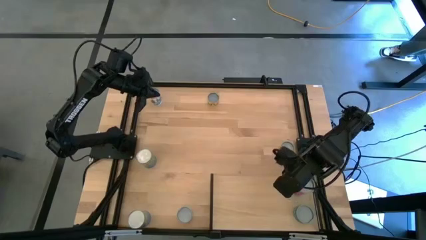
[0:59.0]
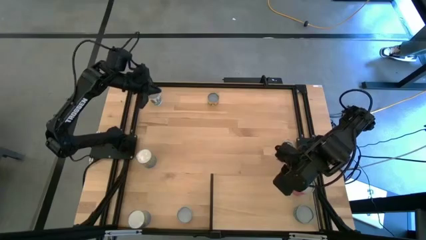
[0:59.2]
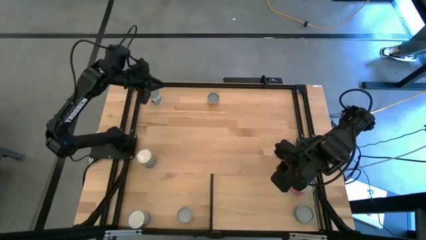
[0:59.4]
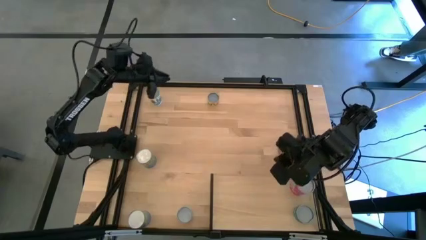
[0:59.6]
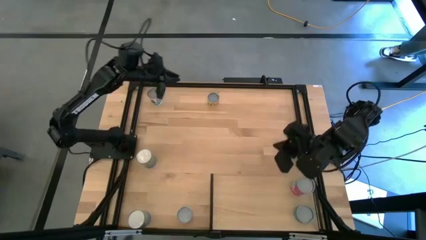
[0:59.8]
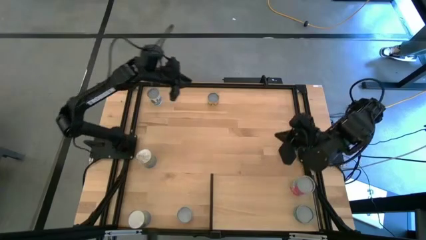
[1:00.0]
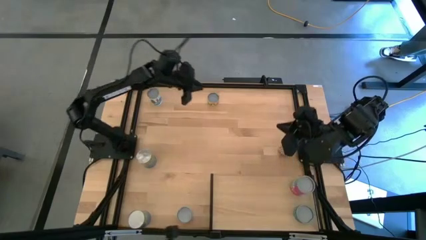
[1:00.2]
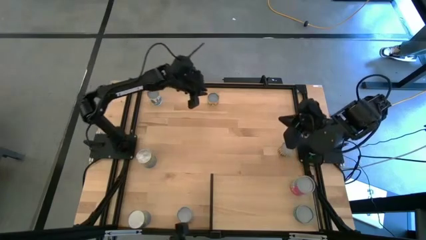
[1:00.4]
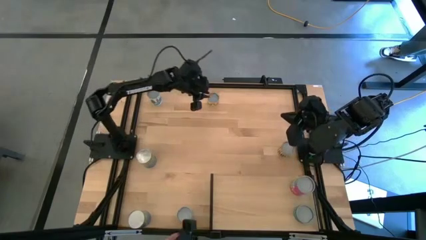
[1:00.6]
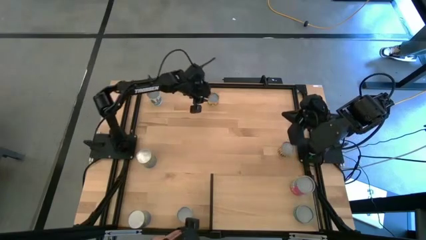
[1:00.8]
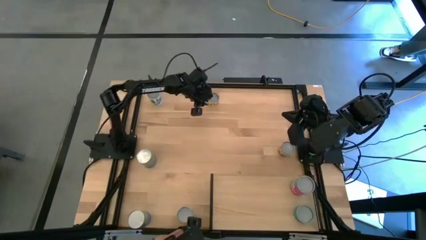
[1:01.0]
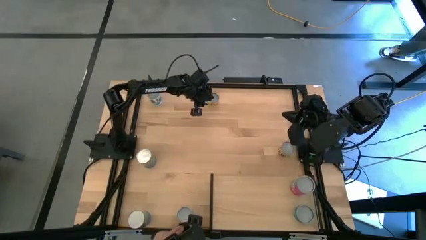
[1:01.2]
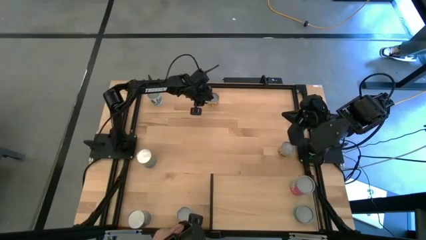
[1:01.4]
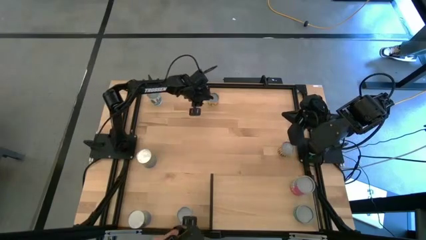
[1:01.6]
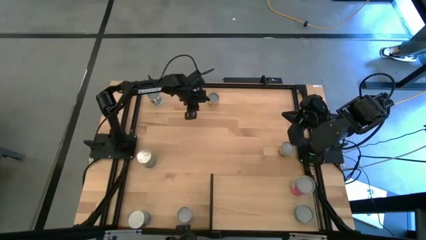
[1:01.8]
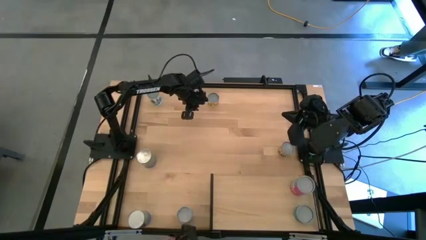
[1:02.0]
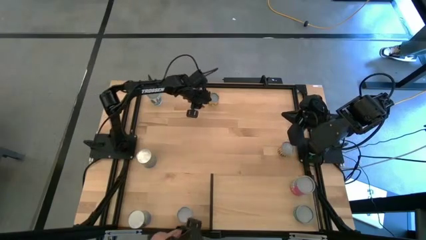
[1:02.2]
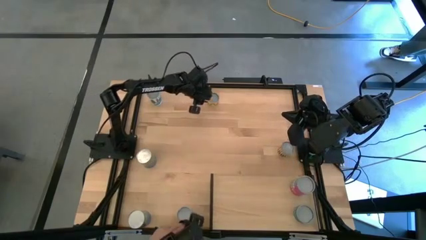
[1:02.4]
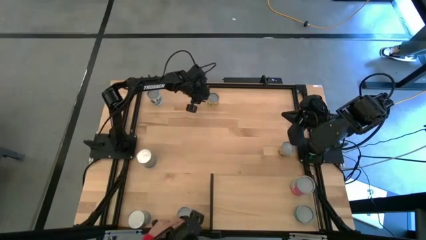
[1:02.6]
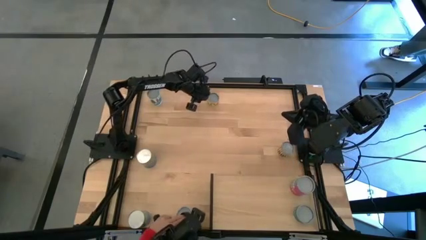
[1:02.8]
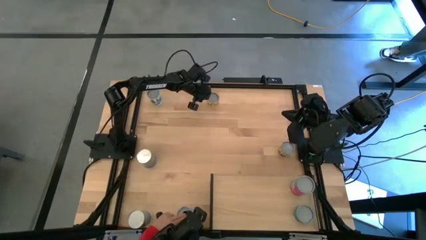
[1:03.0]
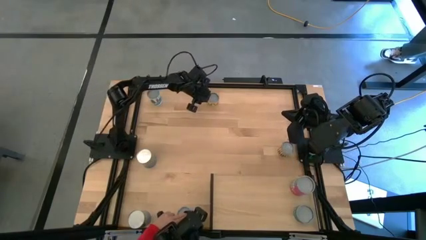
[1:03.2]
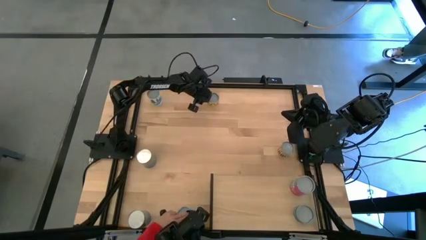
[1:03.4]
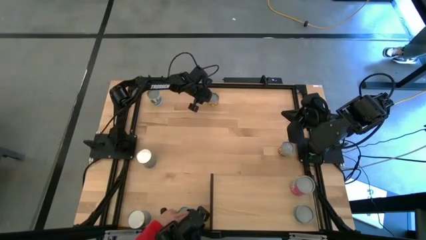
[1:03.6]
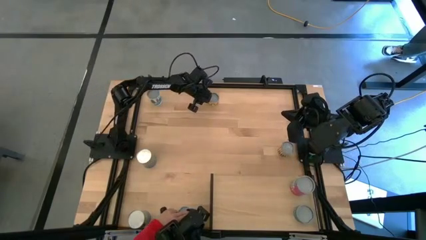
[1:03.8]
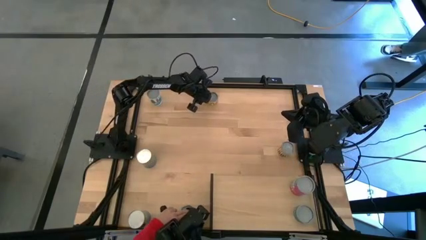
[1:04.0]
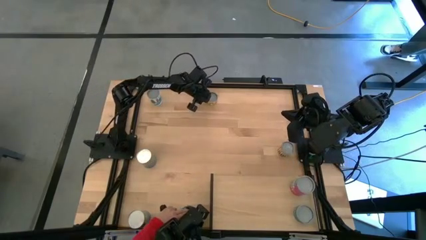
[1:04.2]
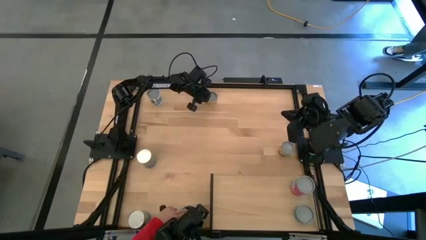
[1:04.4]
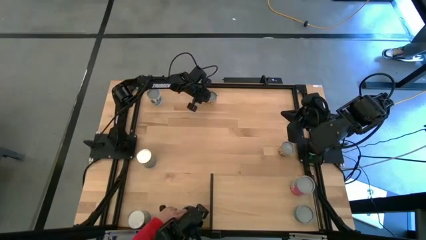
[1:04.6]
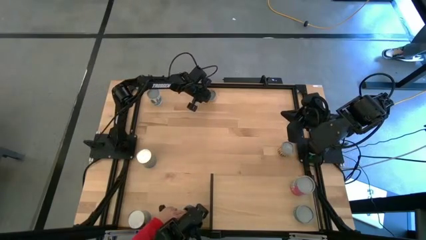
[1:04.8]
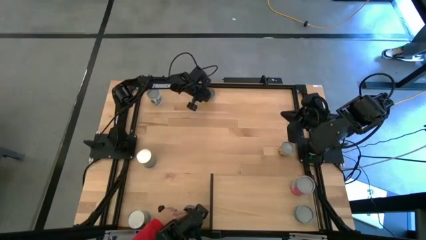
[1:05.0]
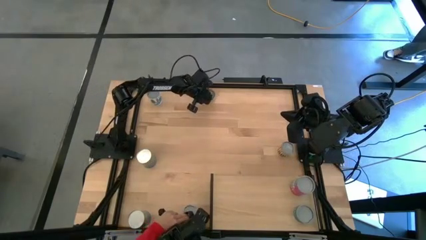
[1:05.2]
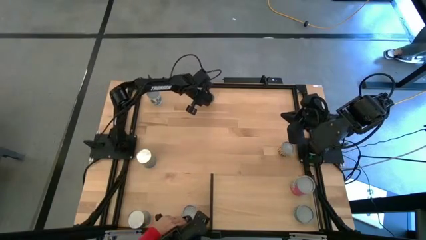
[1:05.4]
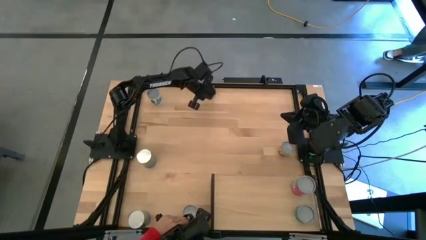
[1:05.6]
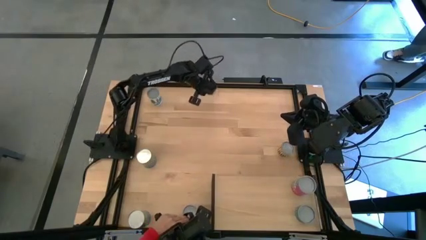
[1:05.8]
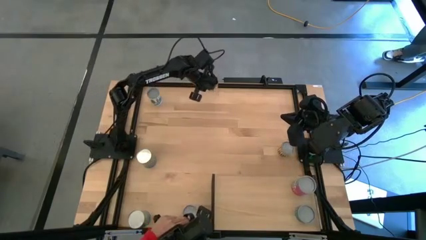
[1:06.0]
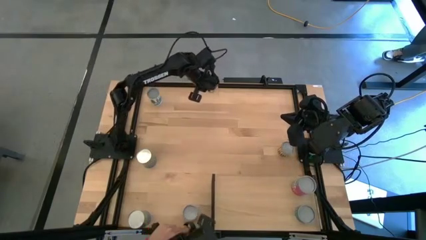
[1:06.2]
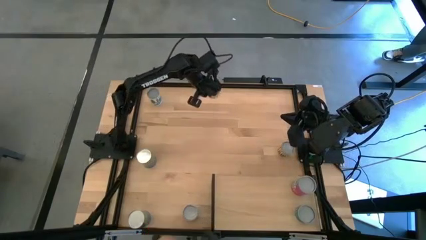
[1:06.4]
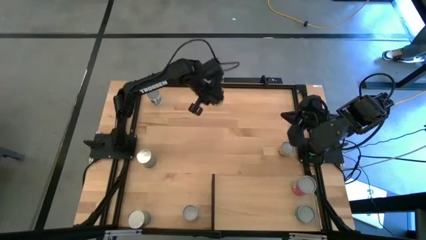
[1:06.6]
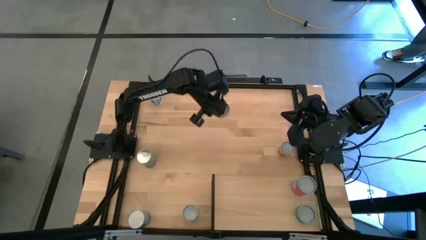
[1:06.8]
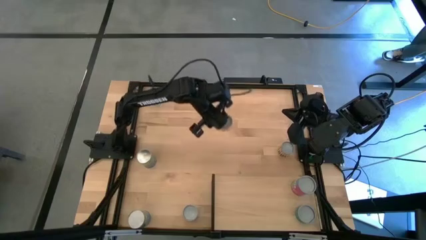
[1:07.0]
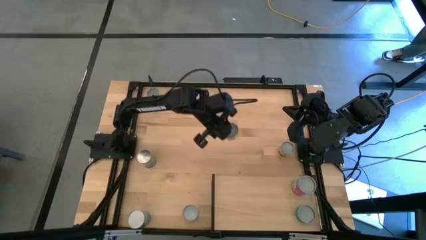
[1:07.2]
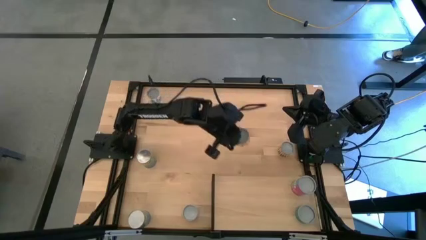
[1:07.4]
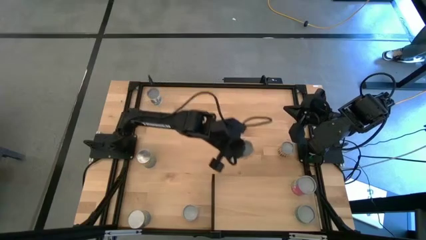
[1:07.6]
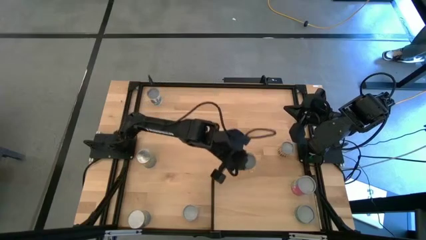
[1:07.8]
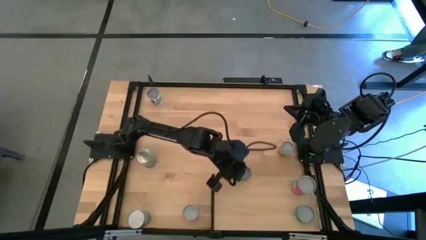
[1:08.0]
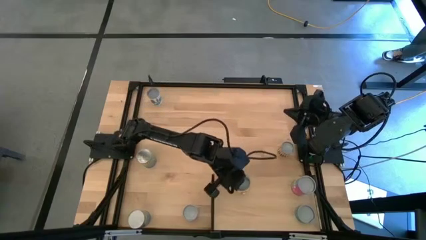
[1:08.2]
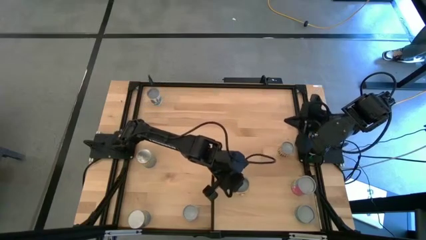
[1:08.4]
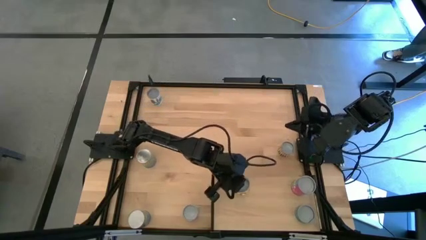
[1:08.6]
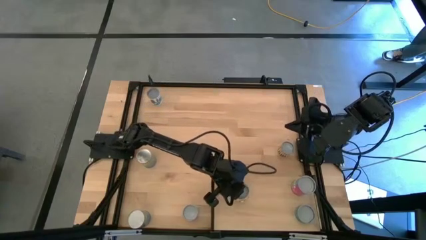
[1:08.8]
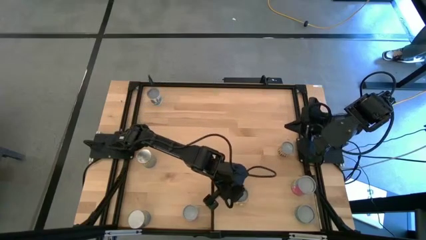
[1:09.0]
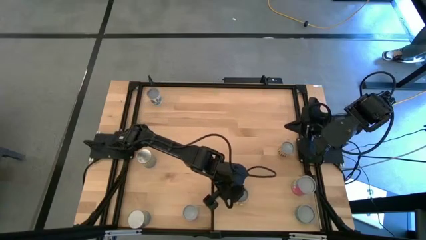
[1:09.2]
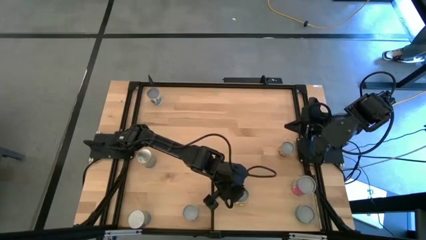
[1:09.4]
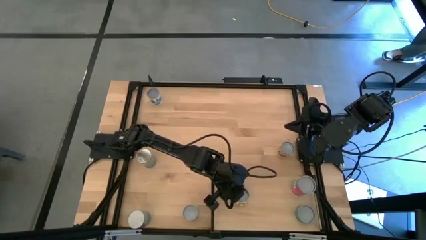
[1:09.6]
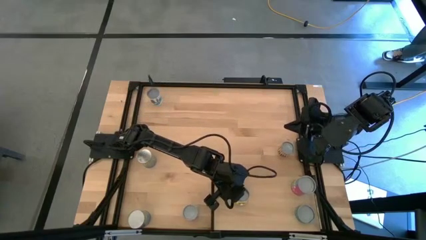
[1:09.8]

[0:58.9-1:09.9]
Task: Pick and place cans onto a shelf
Put the canned mushroom on the shelf
